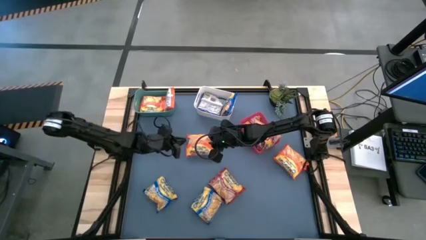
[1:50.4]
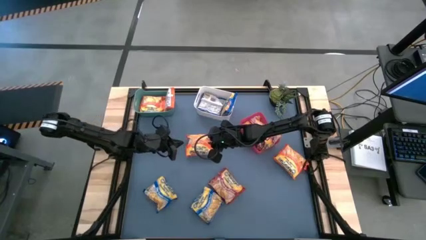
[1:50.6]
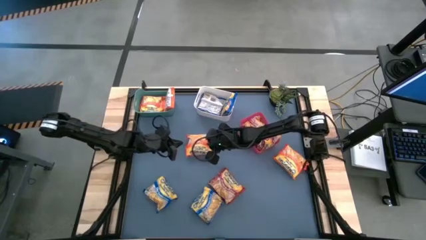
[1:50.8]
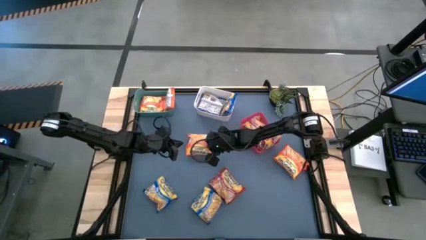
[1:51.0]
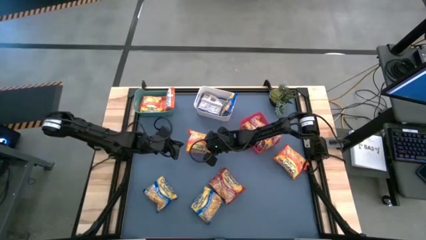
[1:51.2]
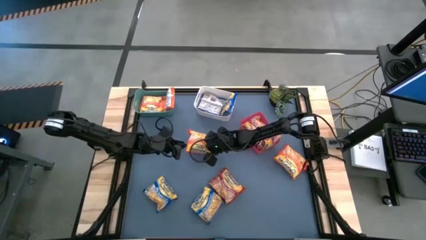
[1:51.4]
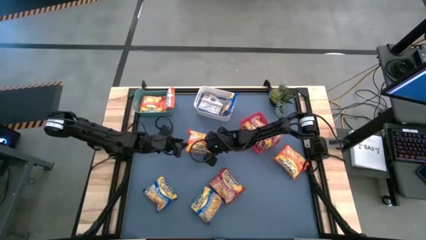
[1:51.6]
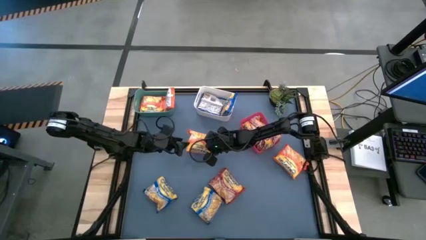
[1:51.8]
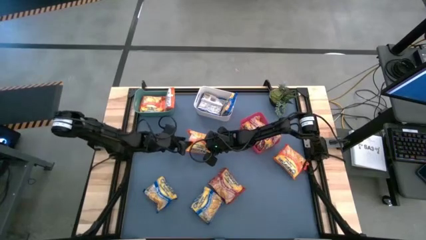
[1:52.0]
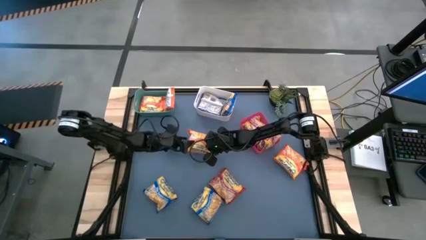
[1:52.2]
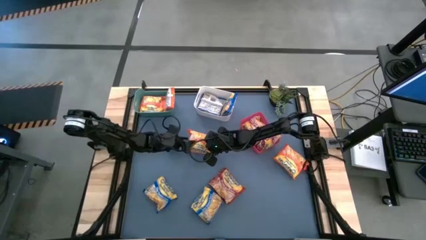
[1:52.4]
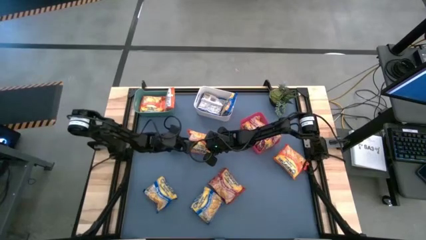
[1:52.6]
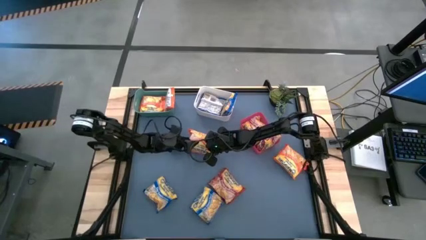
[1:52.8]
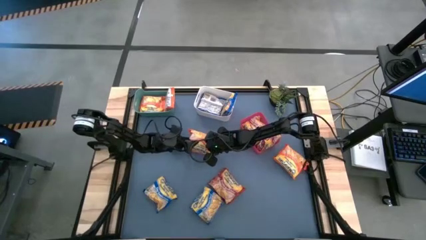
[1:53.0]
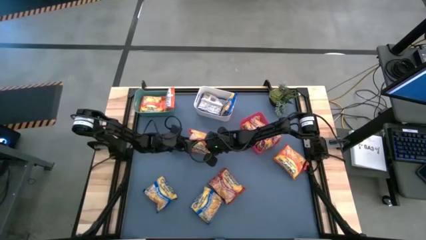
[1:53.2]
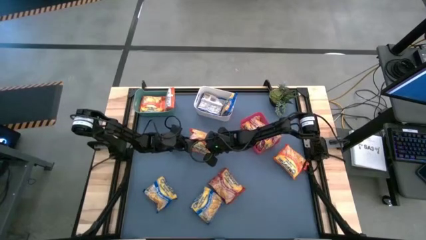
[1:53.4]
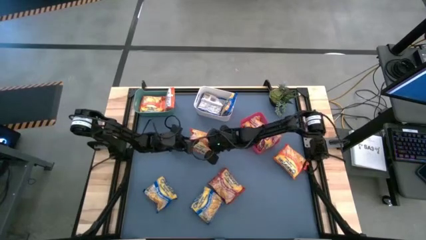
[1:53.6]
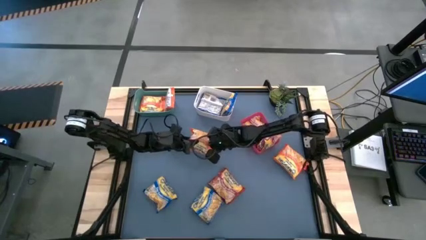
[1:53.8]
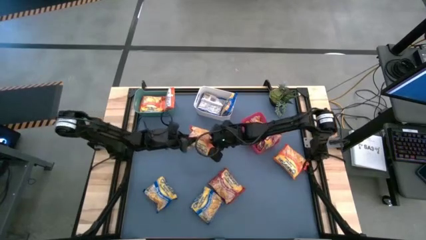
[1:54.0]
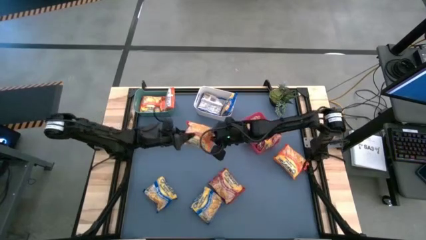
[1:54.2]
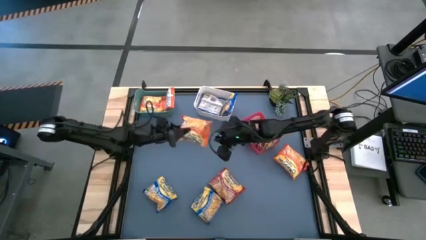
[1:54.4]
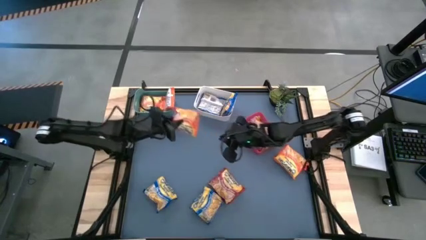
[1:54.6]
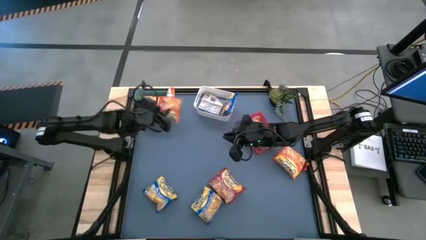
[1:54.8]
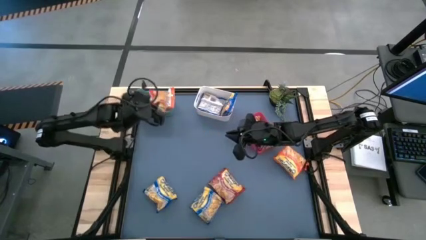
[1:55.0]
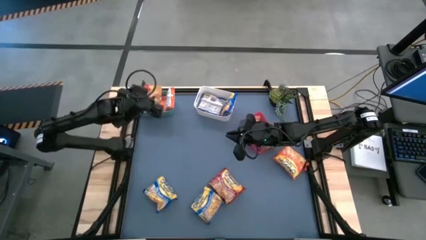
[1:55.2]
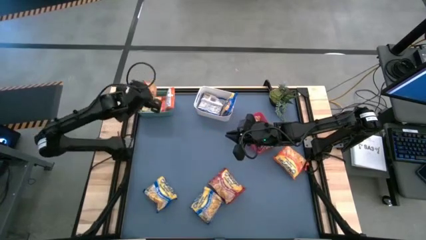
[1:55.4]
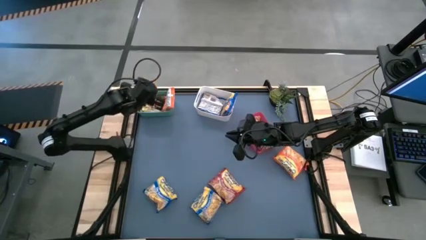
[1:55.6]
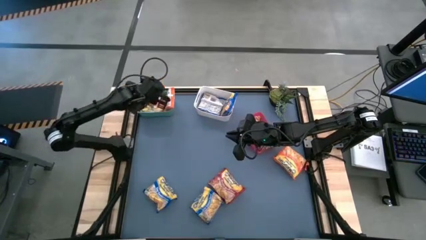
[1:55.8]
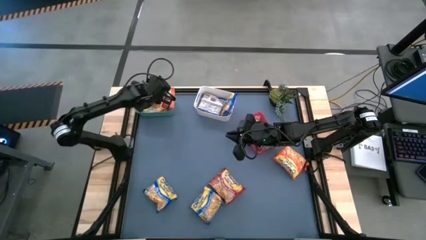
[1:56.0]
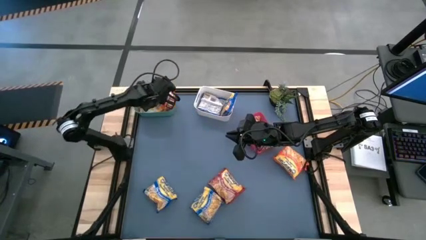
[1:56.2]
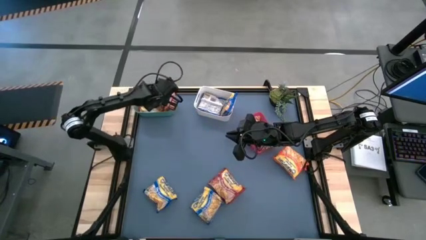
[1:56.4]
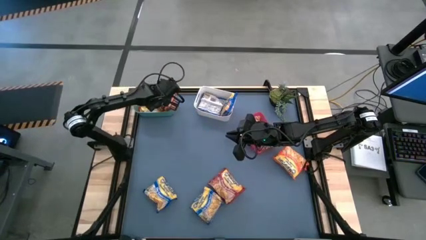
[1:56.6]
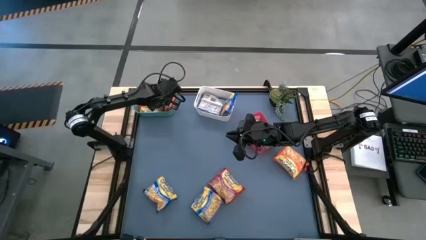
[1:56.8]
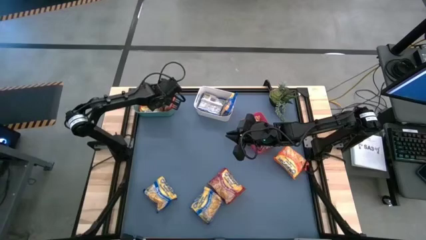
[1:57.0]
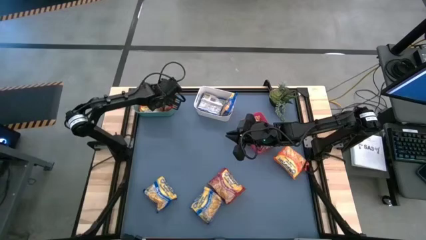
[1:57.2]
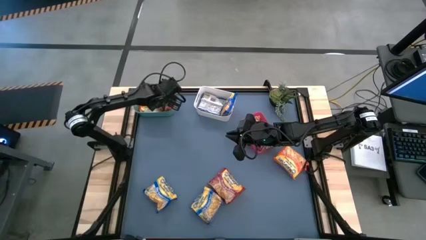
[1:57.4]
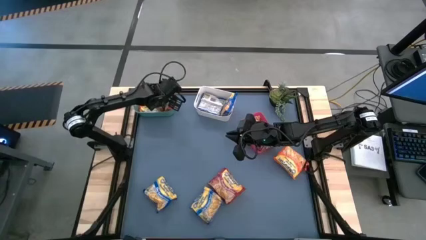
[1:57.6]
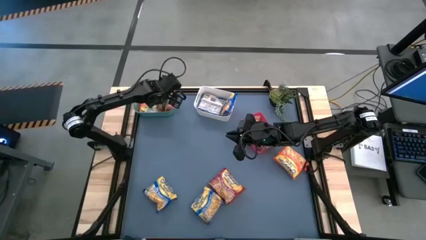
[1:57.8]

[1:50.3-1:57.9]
Task: Sort Maruchan noodles
Put the orange noodle pack into the green bin

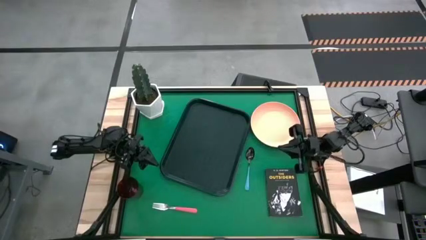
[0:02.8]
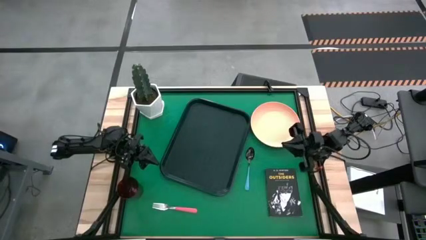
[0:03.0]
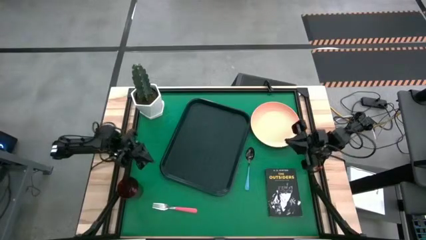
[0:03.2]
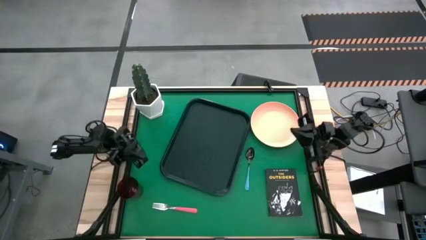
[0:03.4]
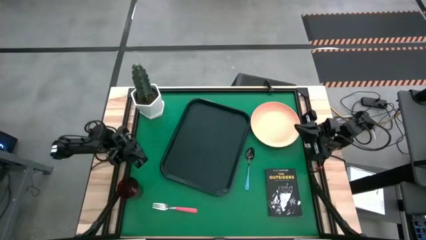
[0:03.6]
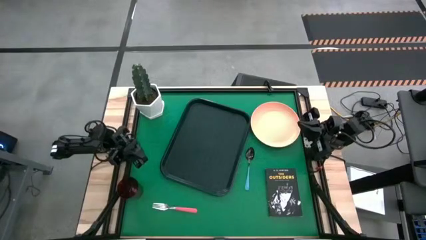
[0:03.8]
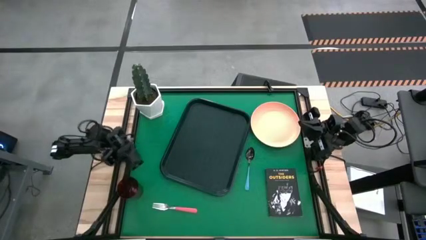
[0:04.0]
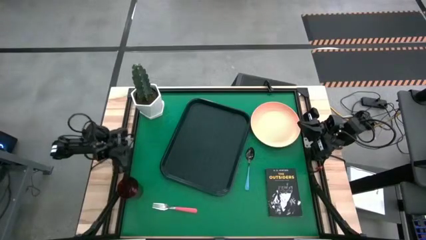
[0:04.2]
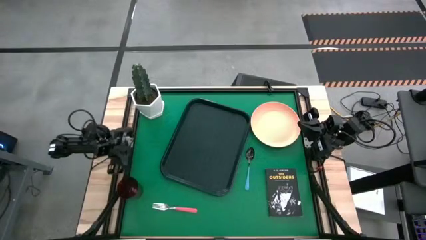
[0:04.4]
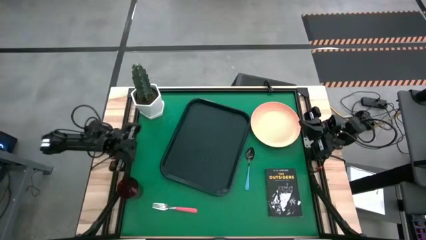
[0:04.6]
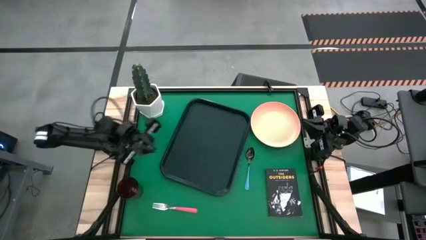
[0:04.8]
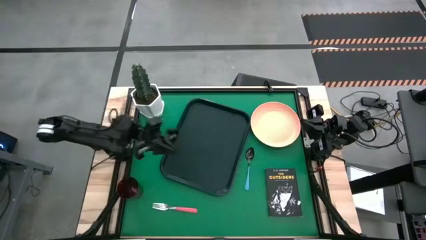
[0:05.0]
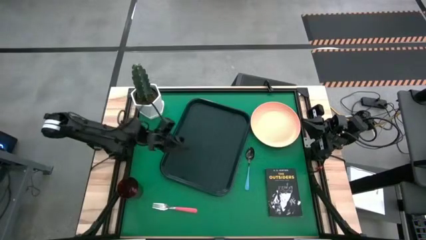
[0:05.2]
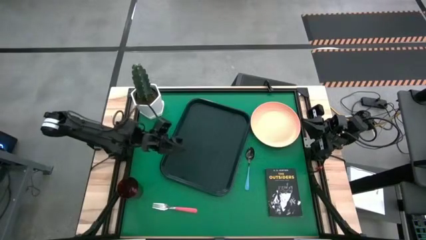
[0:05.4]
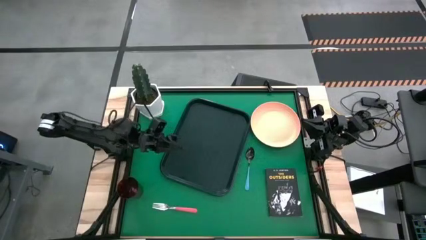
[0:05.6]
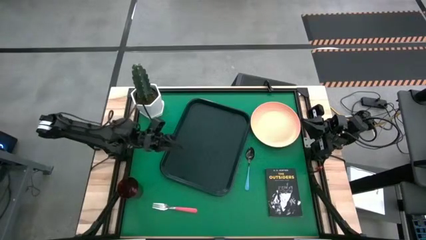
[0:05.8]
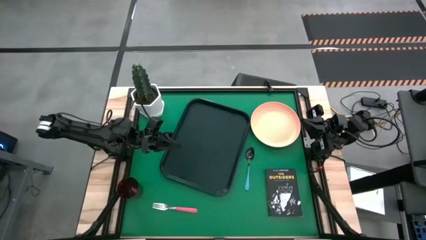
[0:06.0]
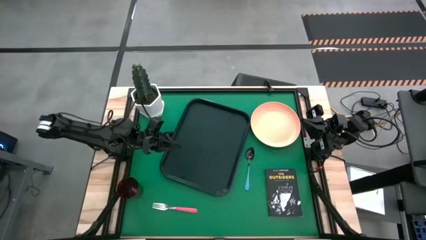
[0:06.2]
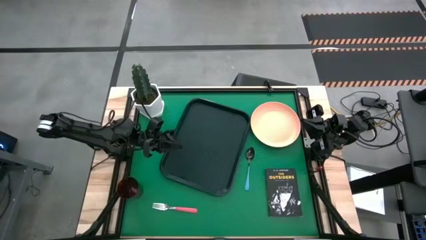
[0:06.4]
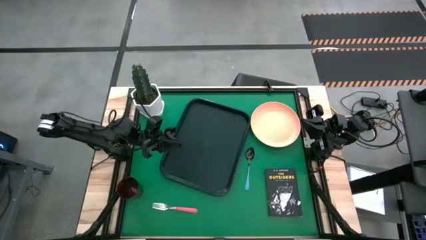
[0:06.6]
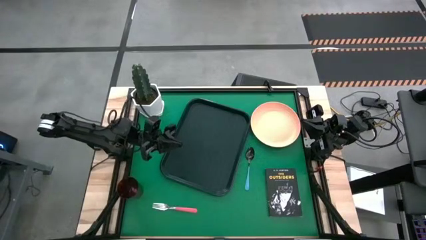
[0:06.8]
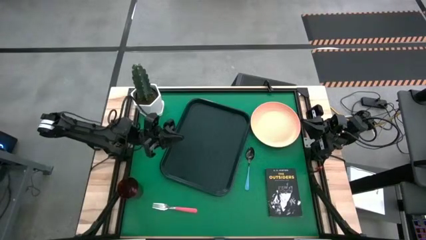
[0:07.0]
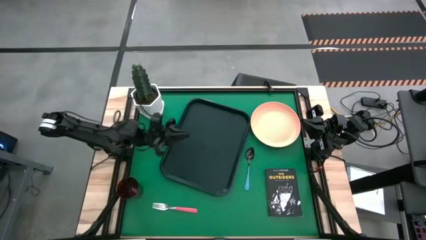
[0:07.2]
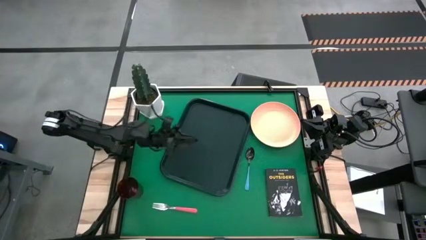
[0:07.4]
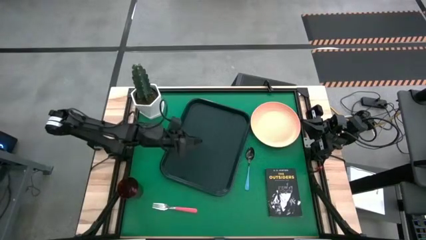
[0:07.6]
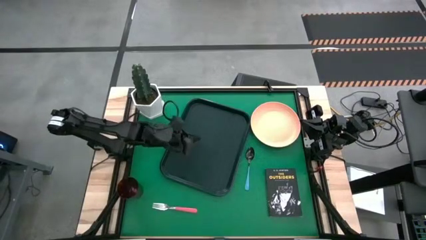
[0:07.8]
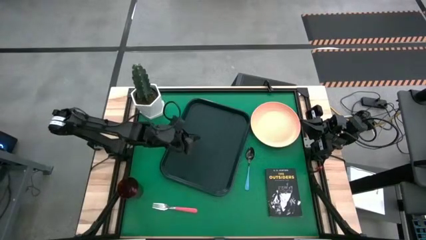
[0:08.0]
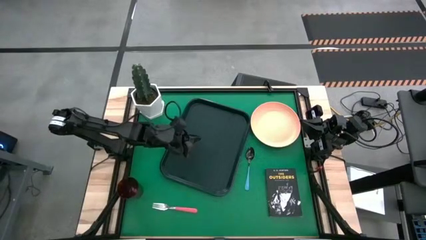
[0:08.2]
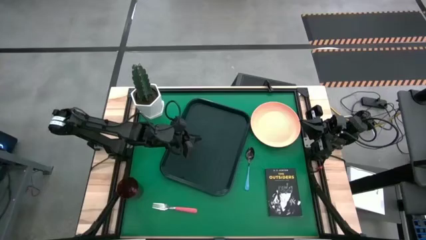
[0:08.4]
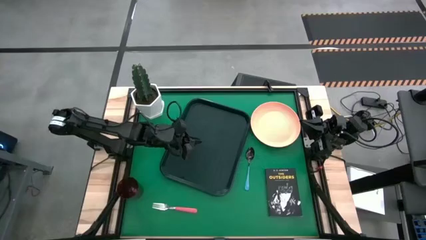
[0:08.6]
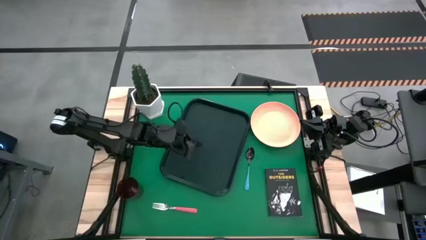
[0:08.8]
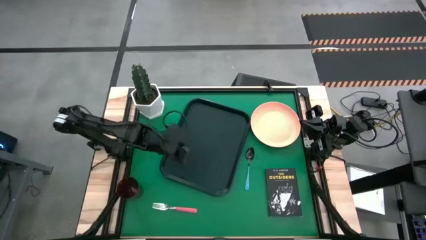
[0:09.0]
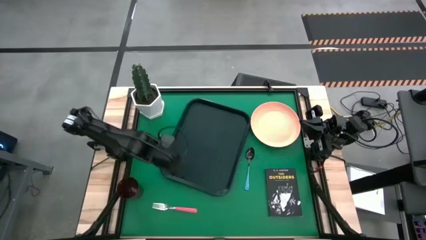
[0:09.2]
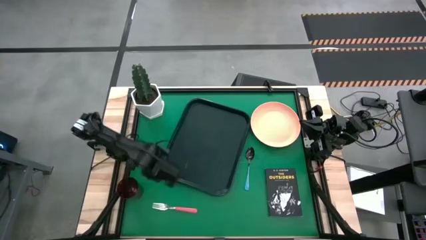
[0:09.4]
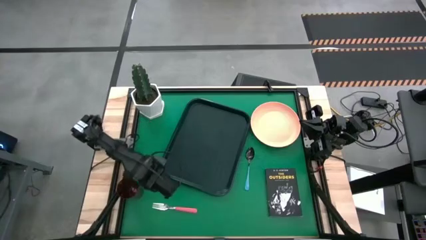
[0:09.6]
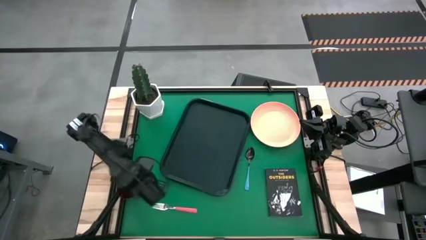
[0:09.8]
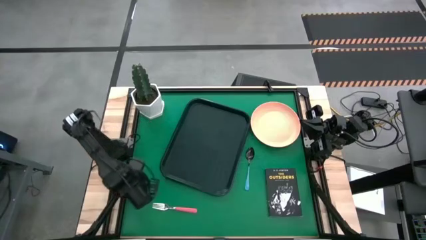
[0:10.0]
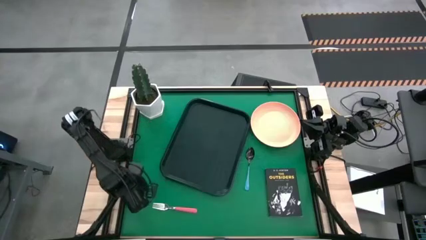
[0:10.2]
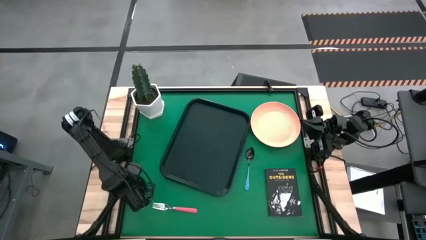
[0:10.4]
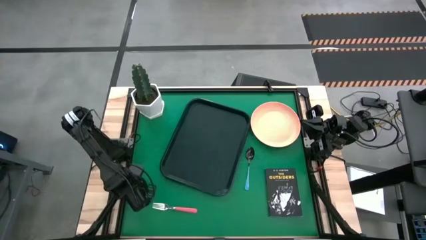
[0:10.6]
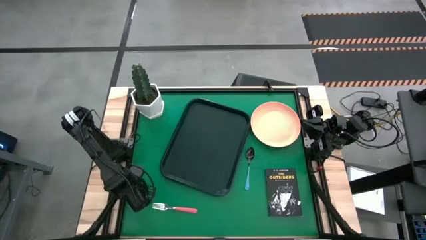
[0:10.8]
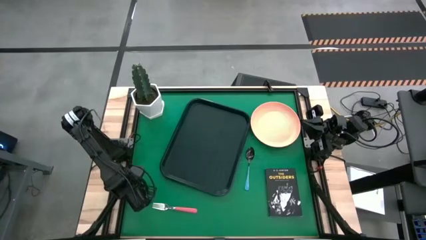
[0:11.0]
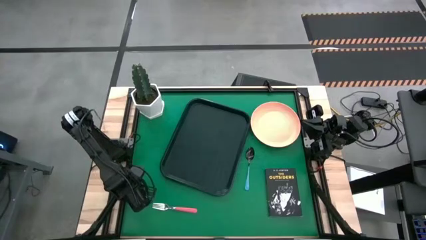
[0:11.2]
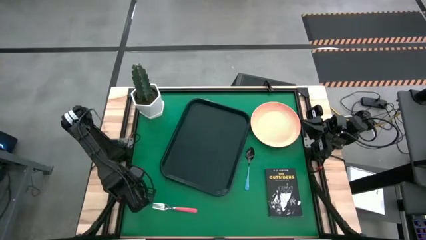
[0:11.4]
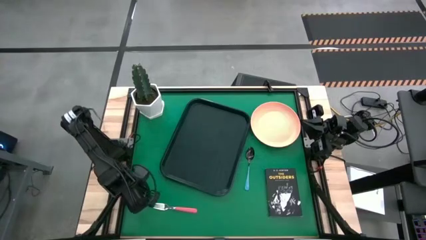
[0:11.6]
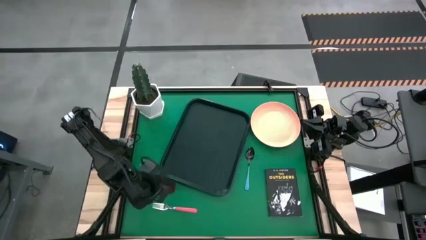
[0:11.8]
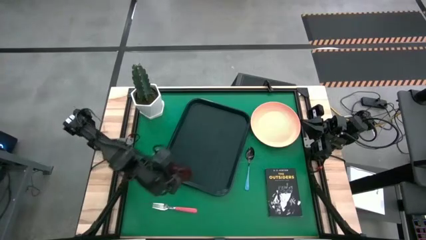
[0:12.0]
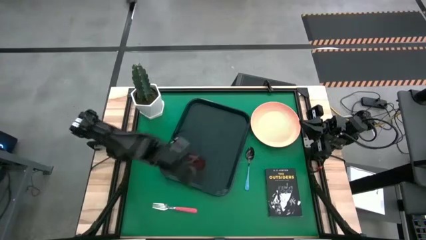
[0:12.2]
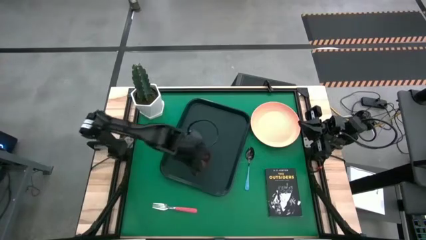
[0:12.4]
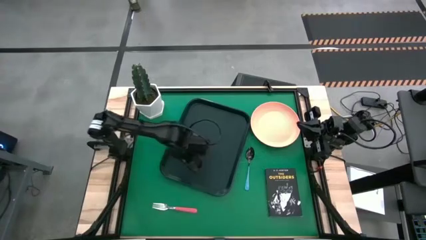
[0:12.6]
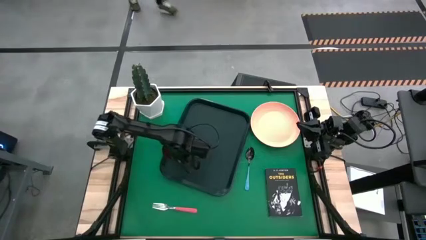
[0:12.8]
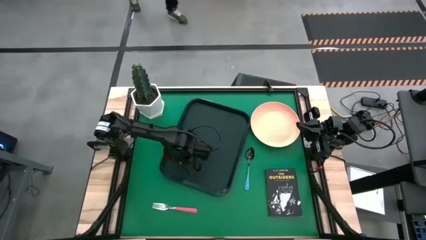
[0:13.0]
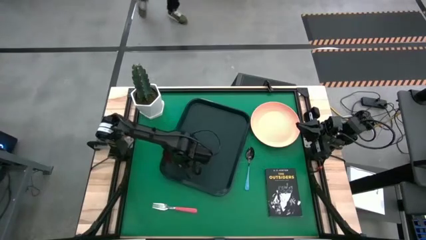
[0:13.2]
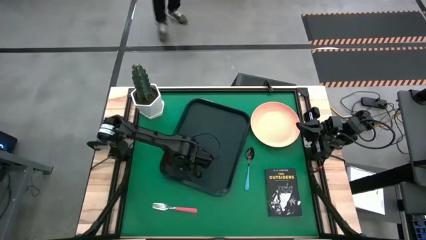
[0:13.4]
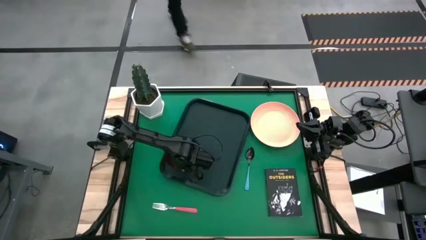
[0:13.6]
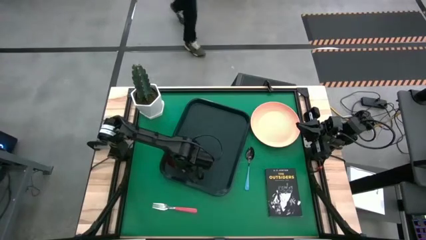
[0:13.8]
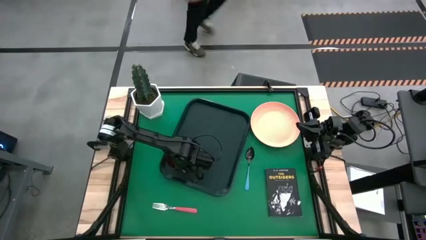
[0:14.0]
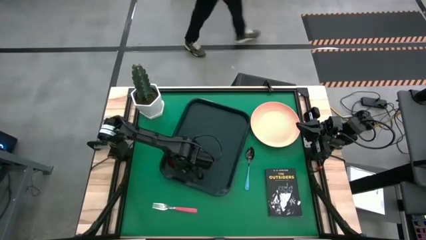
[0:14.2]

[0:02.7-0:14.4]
Task: Pick and place plate/cup/fork/spoon on tray
Put the red cup to the top left of the serving tray
